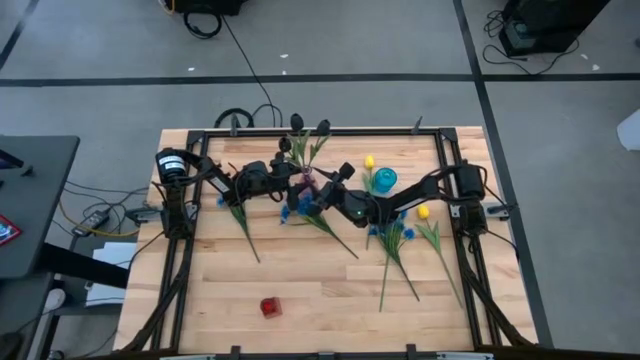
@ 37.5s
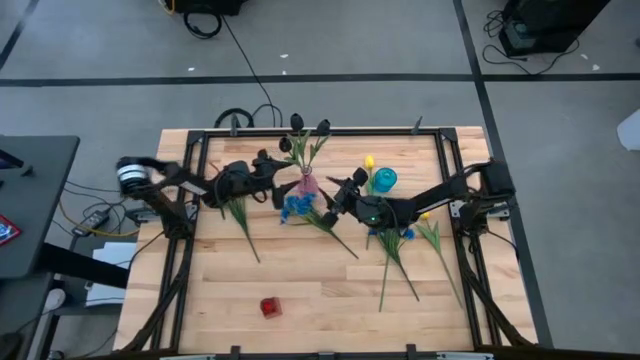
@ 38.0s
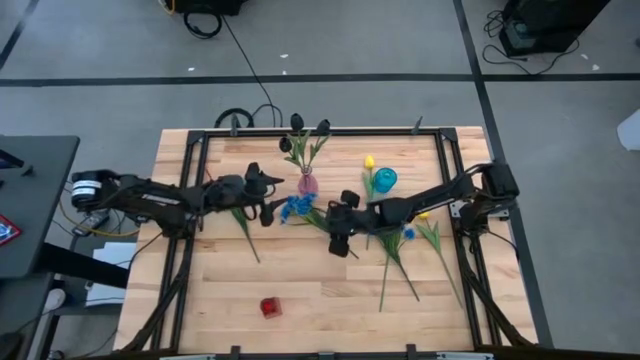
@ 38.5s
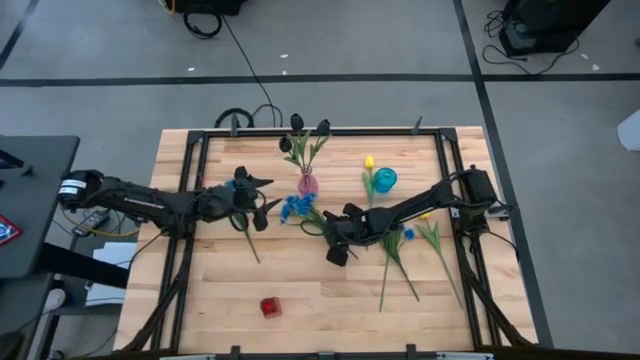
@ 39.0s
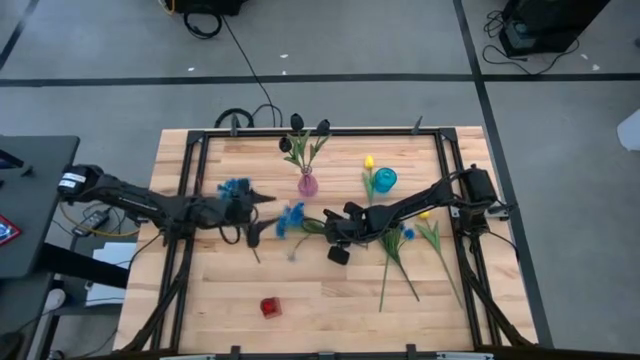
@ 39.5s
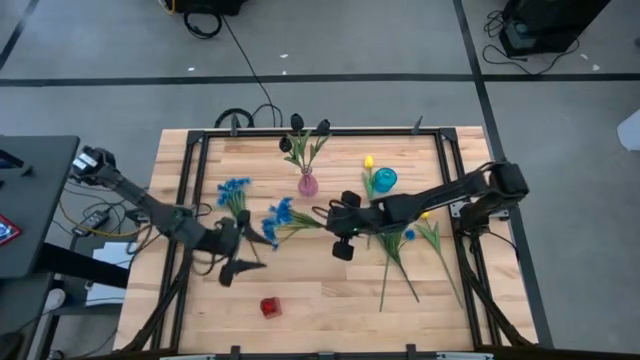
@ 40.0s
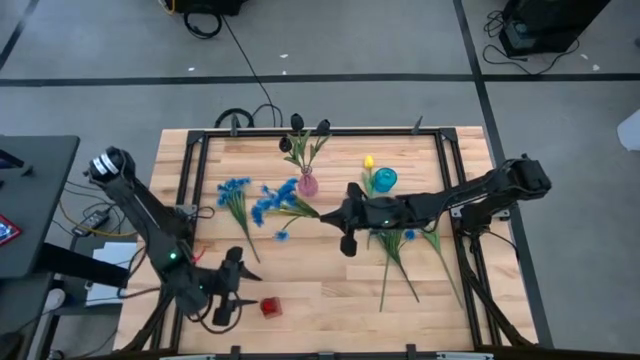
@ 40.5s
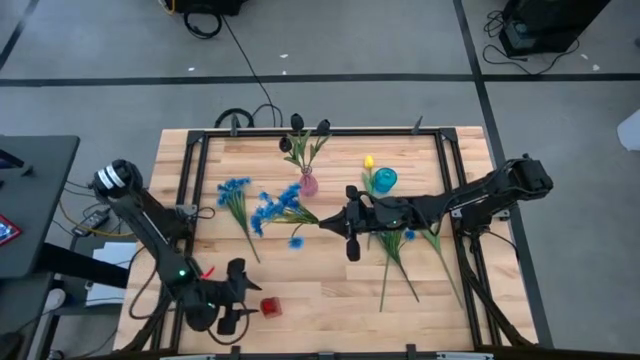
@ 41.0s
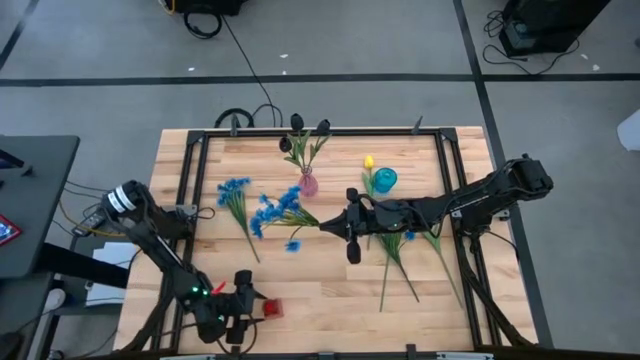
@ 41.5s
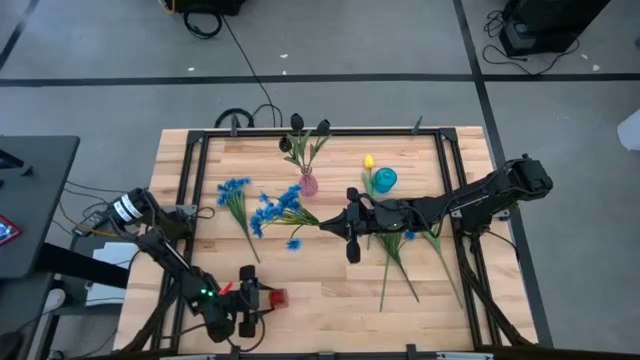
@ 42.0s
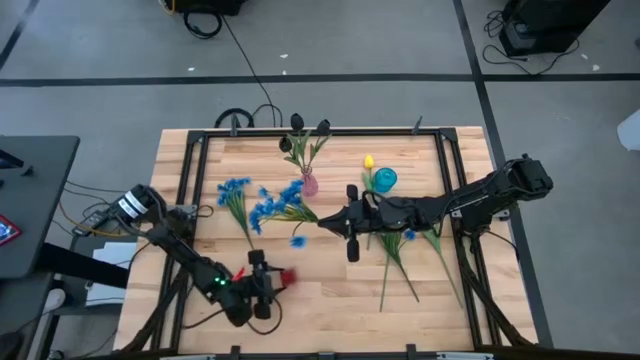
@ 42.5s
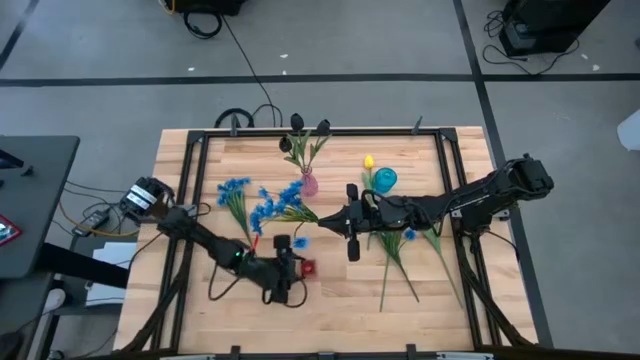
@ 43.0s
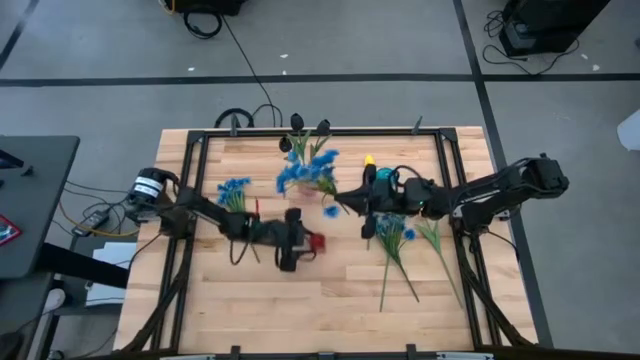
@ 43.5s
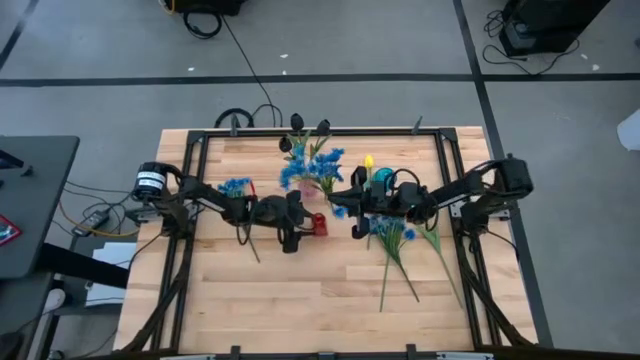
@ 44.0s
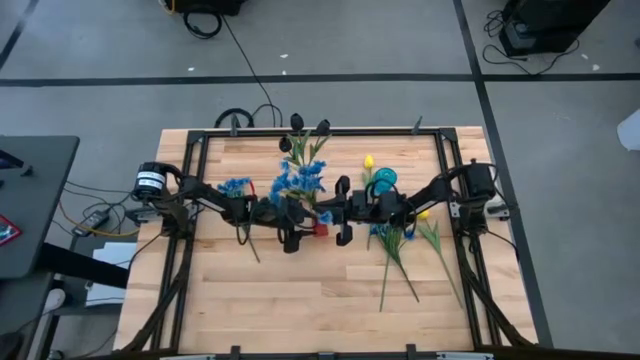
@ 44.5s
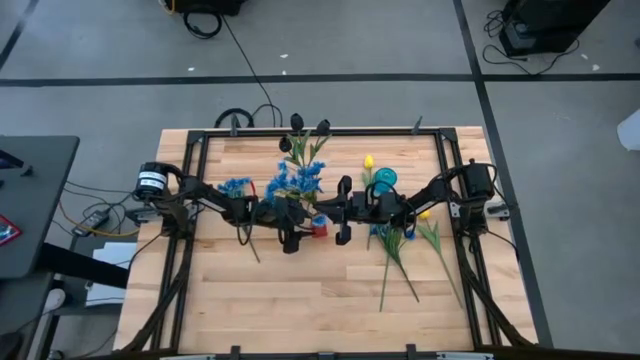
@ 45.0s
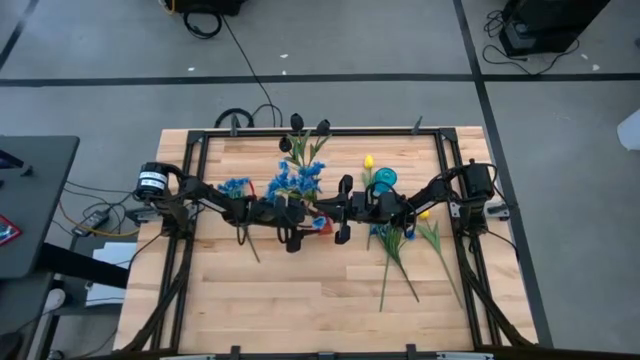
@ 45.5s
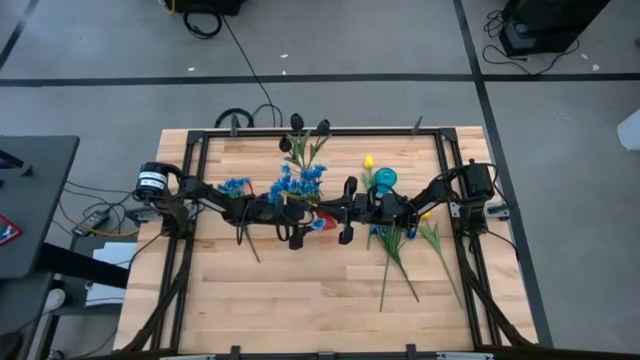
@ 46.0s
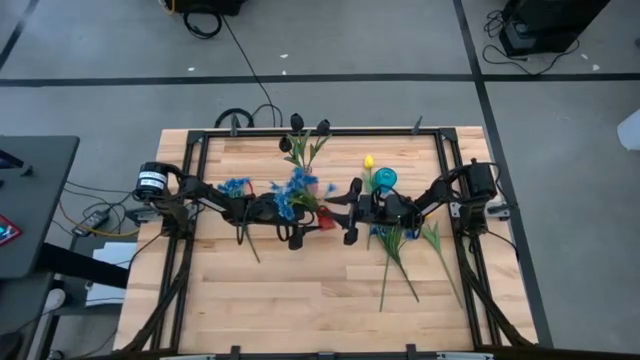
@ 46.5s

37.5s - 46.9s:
Task: Sort flowers into vase by color
Put the blue flowers into the red vase

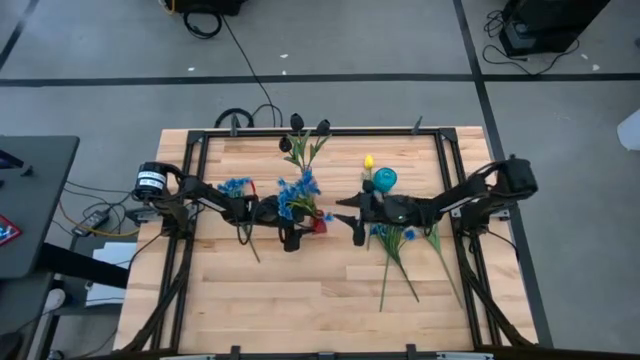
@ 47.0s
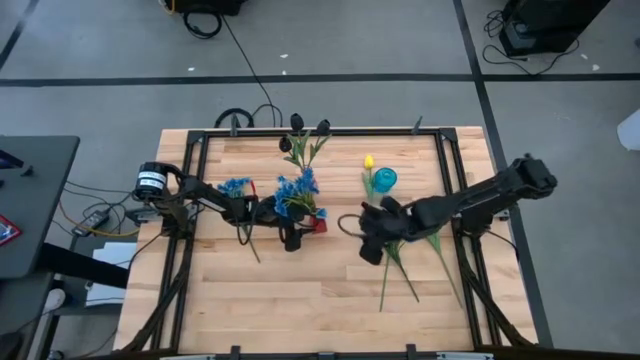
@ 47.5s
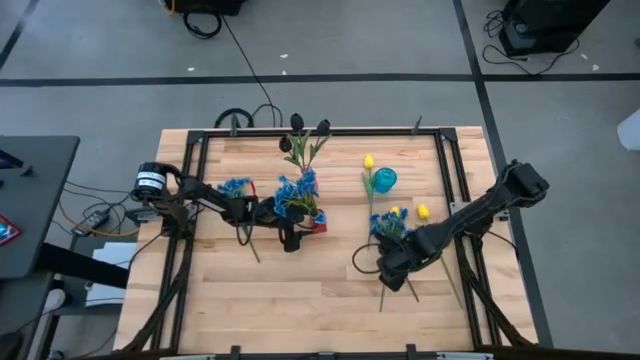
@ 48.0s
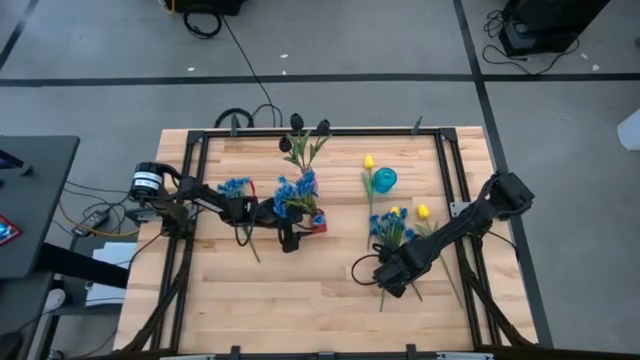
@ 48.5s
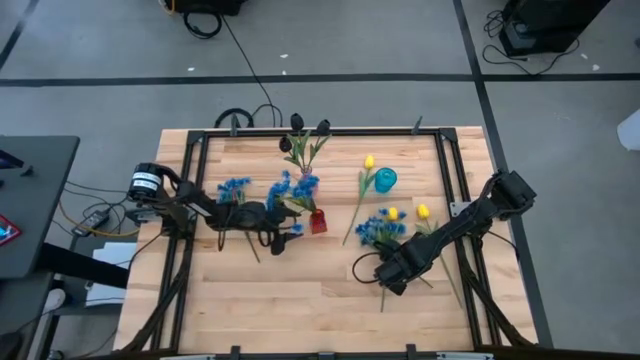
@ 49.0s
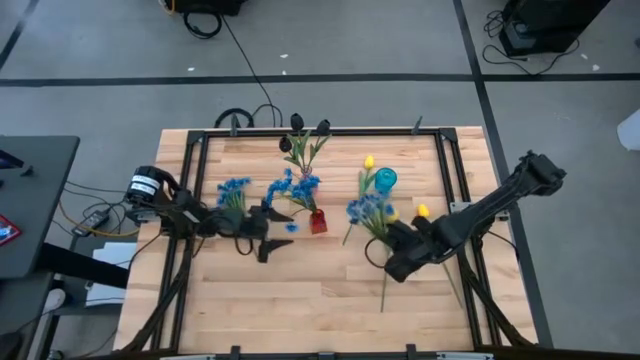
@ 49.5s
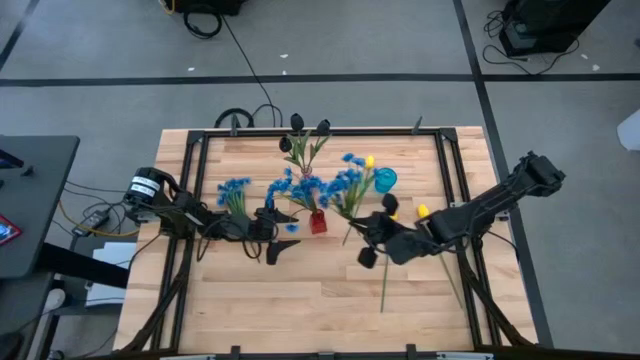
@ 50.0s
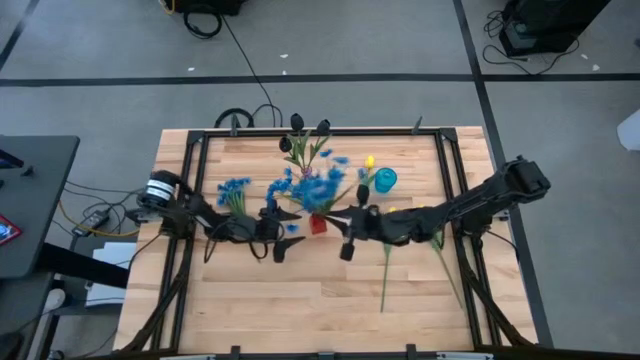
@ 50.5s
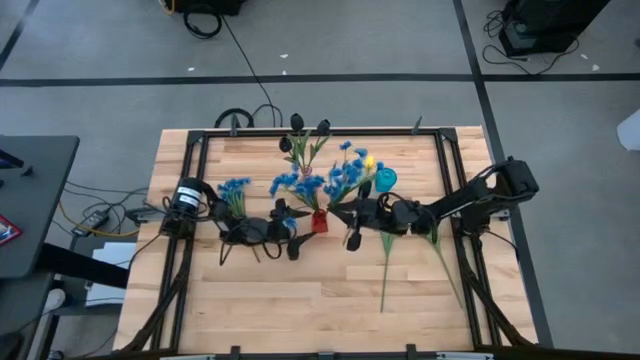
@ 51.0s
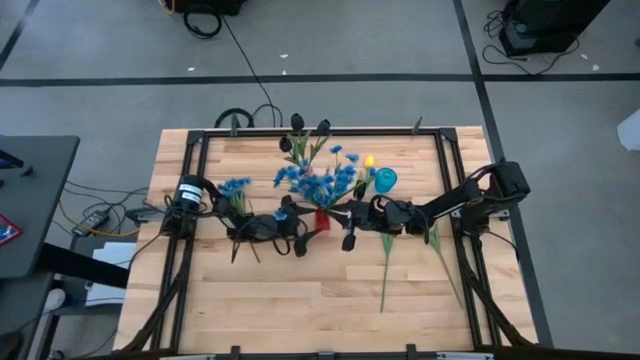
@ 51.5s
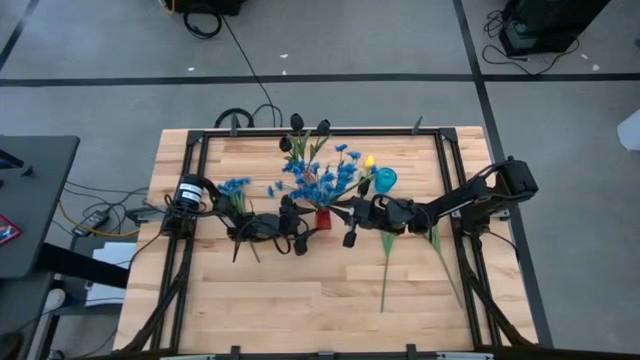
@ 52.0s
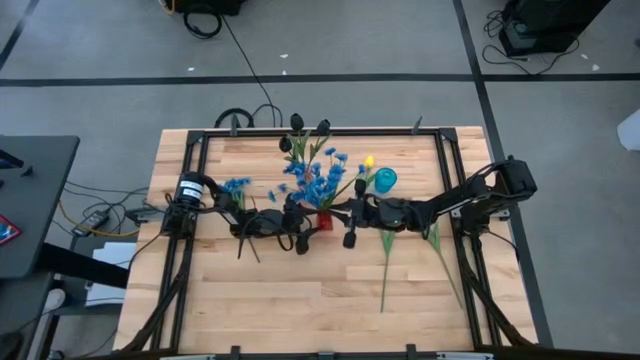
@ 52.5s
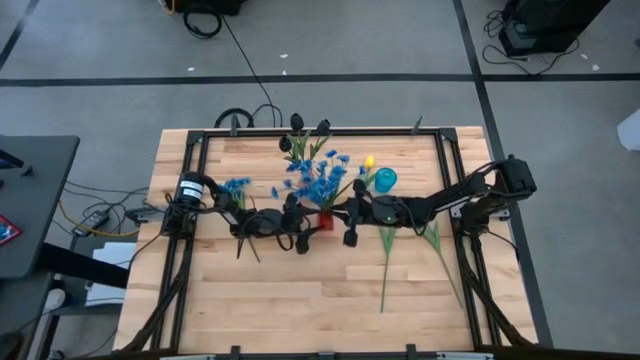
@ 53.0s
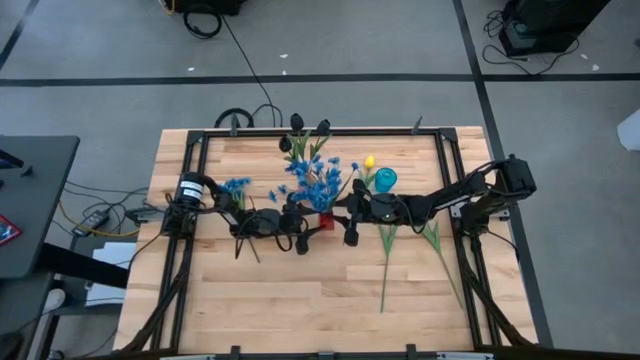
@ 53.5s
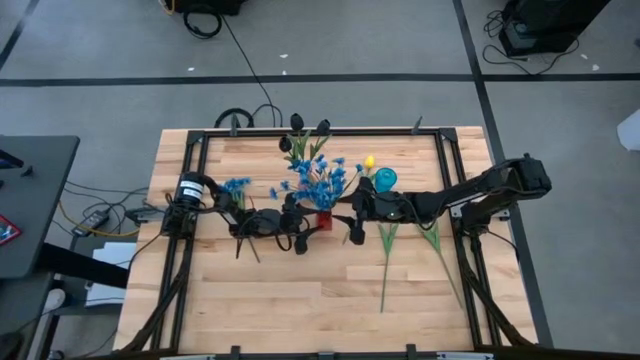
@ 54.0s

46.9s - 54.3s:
Put the blue flowers into the red vase

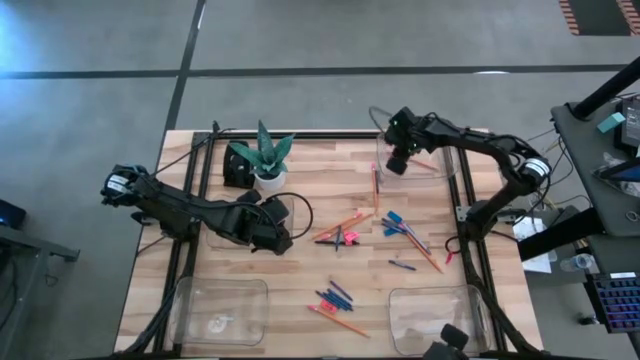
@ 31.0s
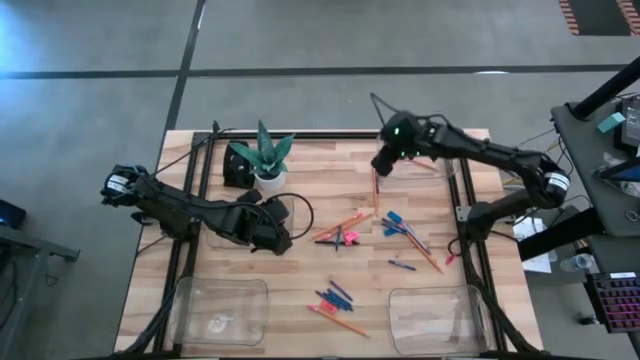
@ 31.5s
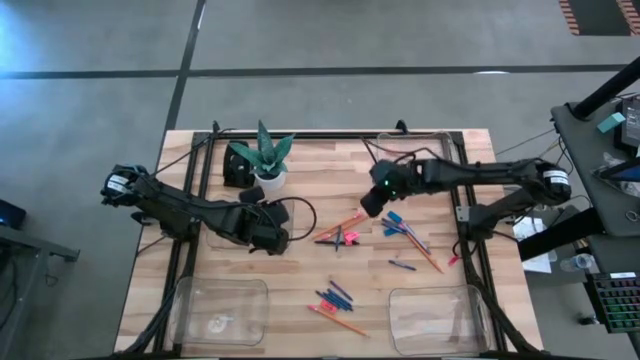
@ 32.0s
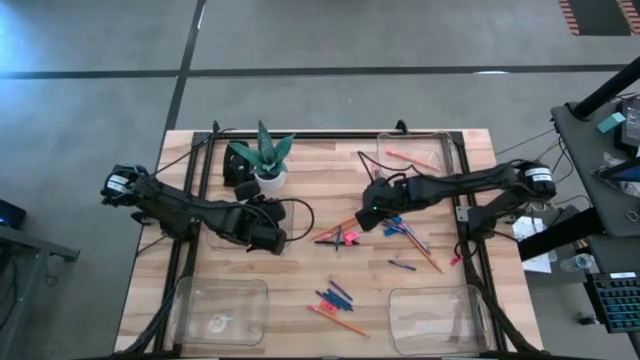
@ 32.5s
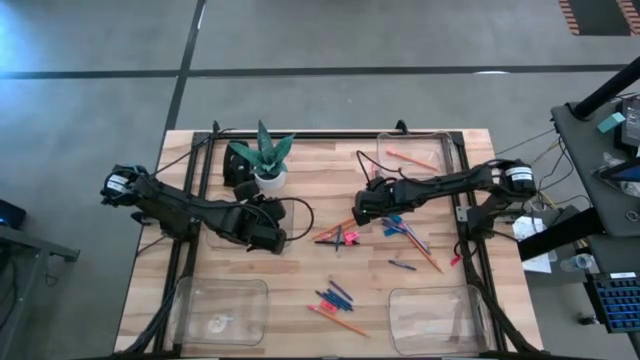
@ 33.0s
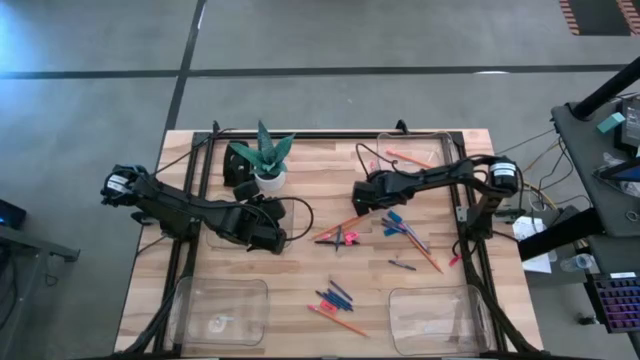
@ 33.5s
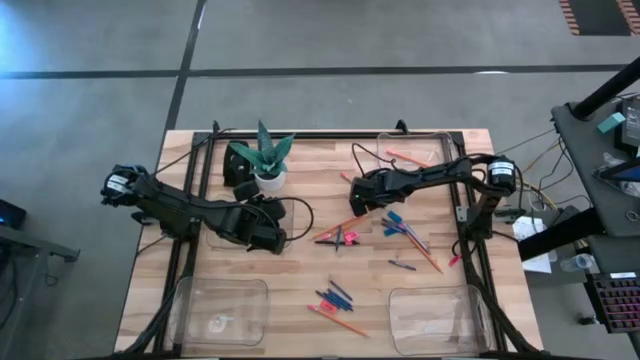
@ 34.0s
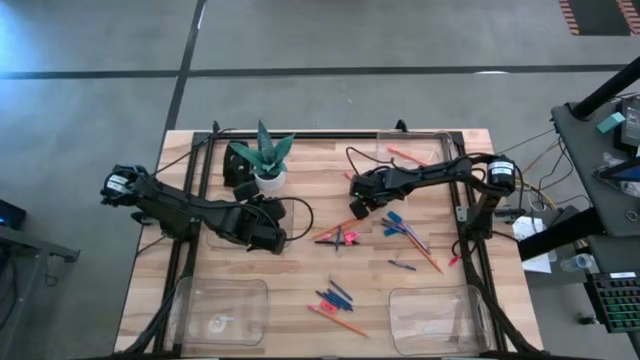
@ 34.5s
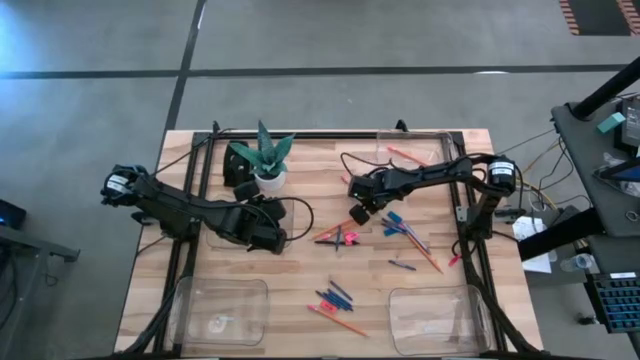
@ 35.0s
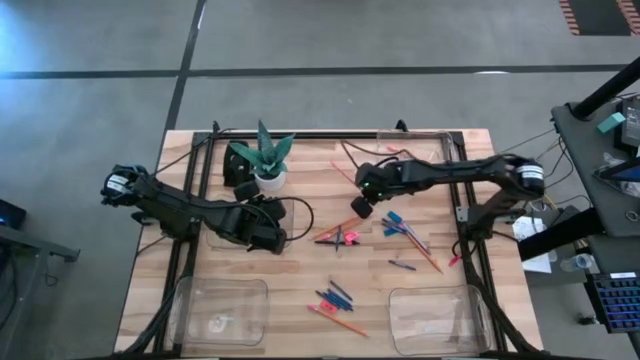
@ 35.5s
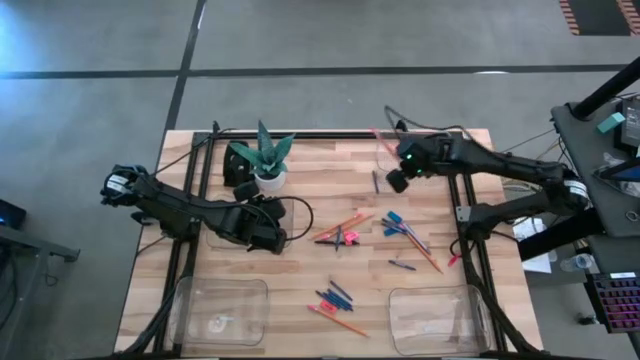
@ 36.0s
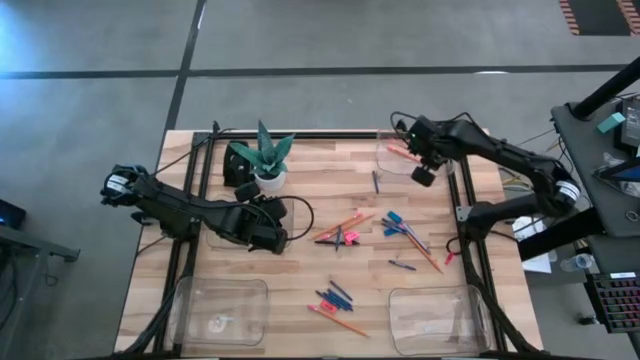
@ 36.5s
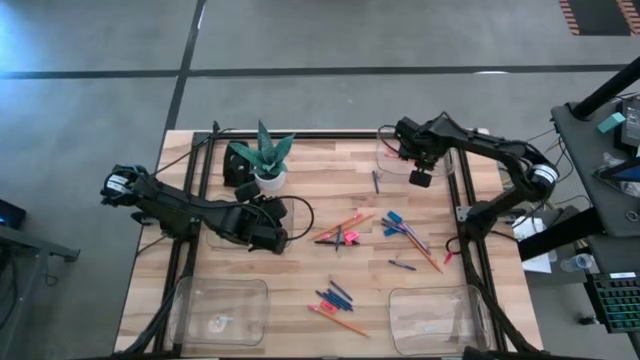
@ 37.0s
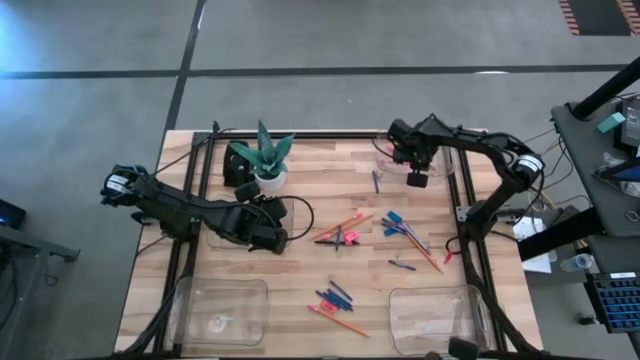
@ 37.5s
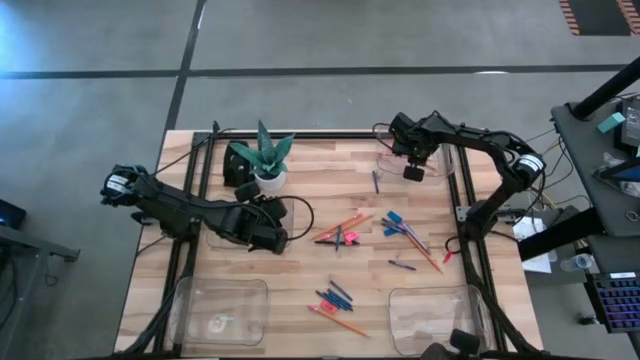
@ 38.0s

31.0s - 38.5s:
Task: Sort crayons/erasers/pens/pencils in bins
Put the orange pencil into the top right transparent bin
